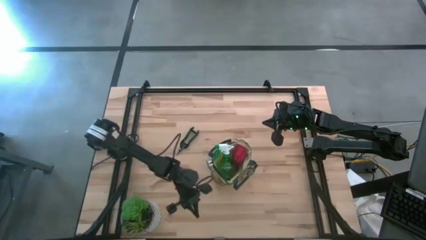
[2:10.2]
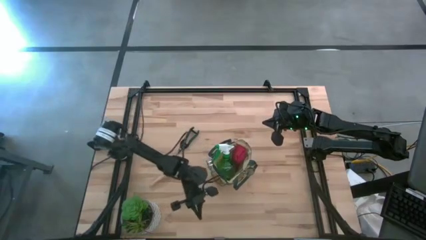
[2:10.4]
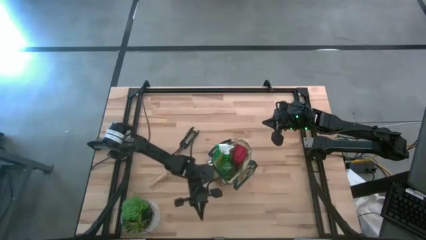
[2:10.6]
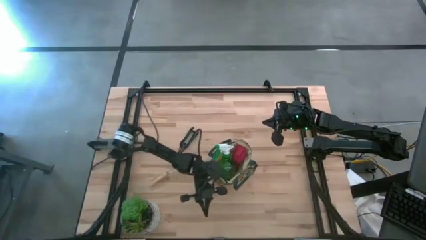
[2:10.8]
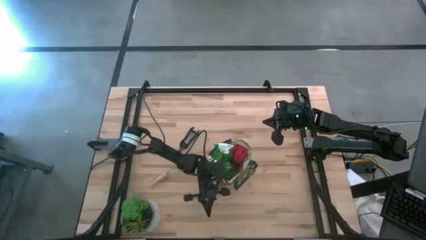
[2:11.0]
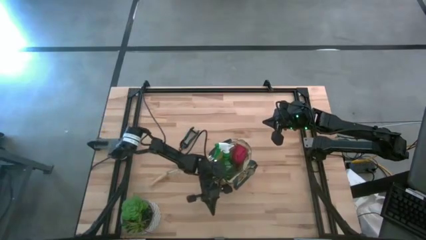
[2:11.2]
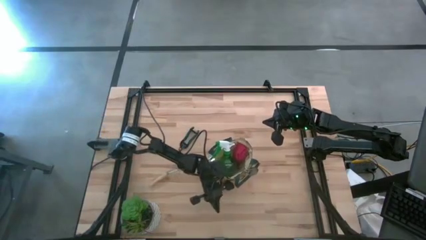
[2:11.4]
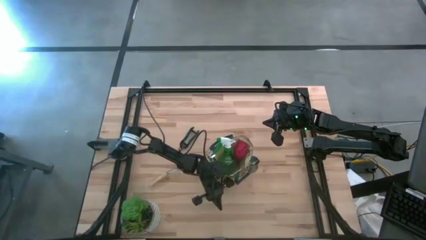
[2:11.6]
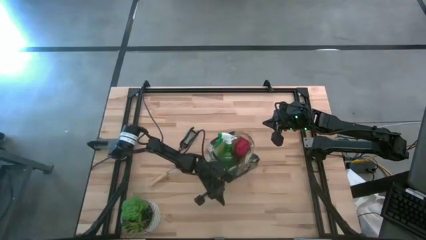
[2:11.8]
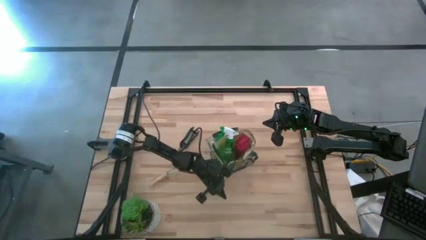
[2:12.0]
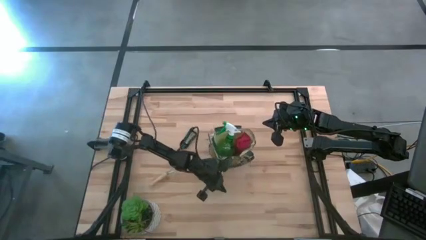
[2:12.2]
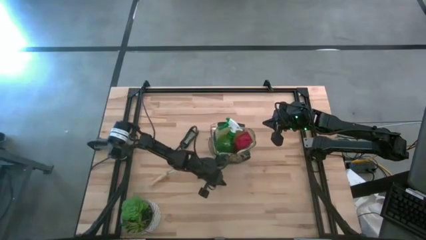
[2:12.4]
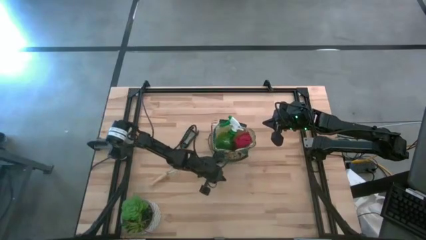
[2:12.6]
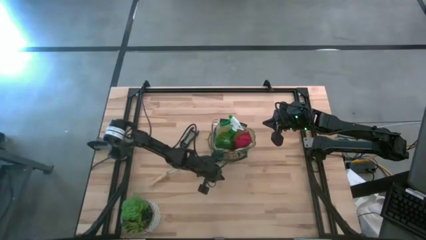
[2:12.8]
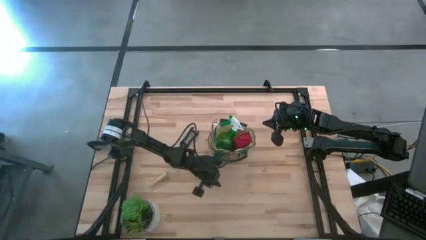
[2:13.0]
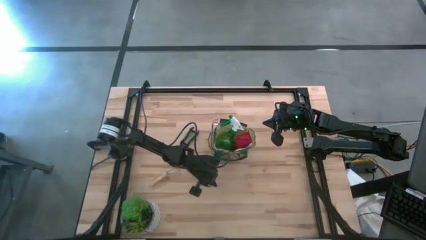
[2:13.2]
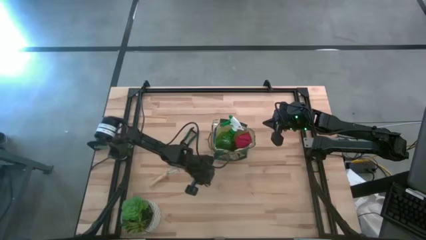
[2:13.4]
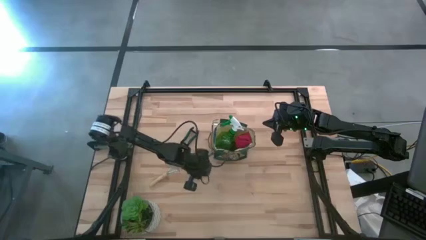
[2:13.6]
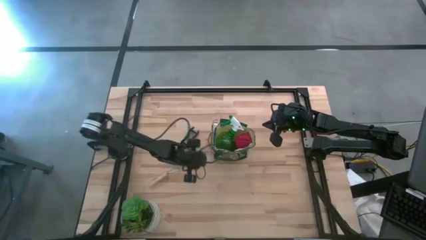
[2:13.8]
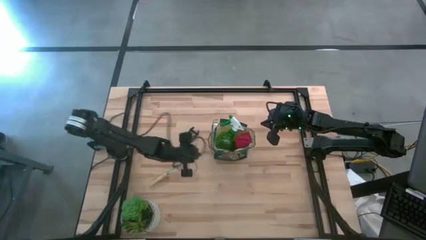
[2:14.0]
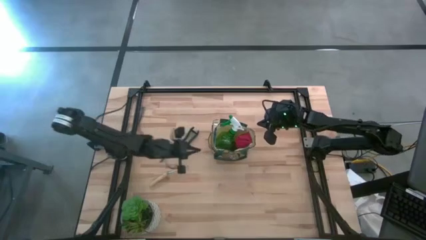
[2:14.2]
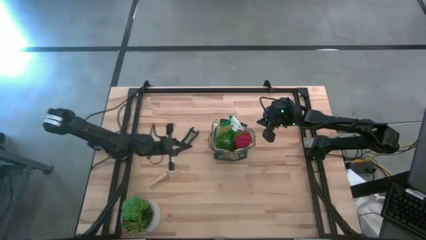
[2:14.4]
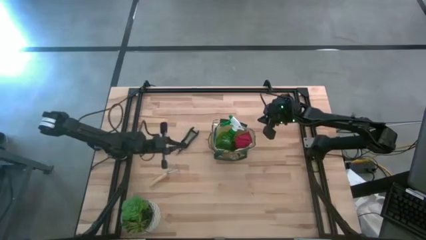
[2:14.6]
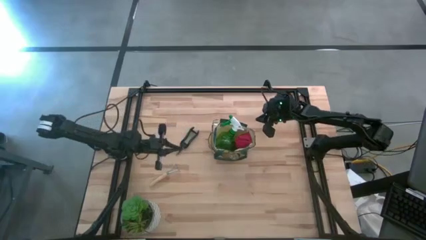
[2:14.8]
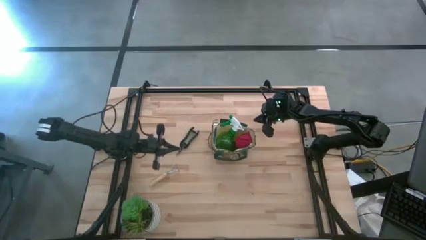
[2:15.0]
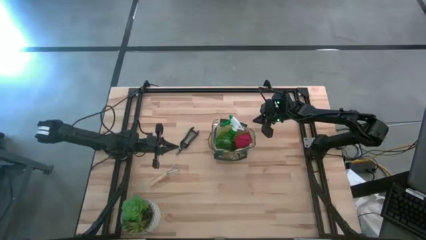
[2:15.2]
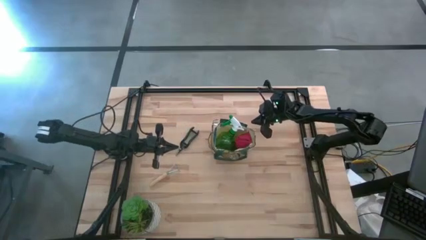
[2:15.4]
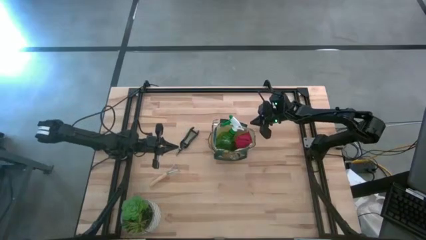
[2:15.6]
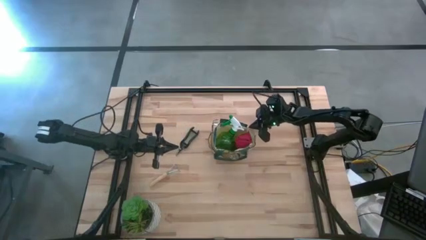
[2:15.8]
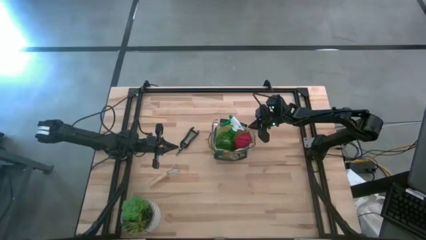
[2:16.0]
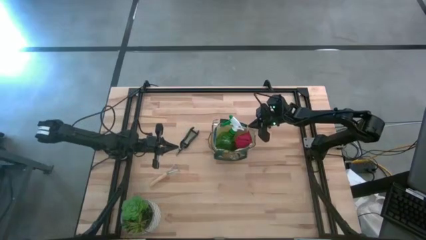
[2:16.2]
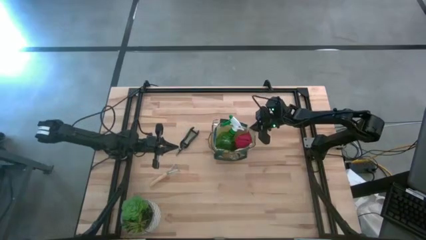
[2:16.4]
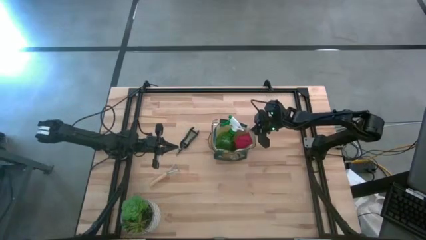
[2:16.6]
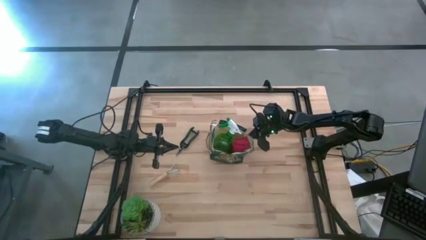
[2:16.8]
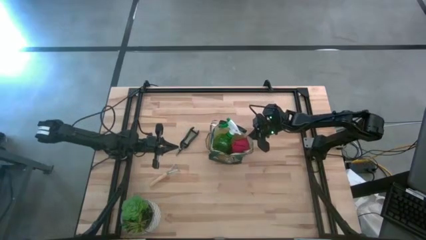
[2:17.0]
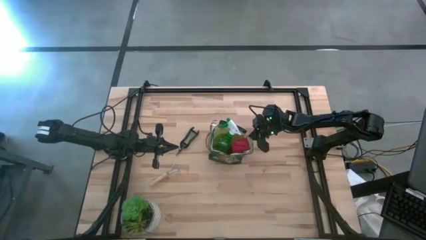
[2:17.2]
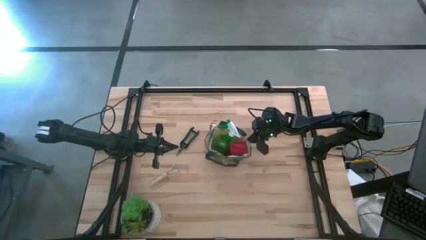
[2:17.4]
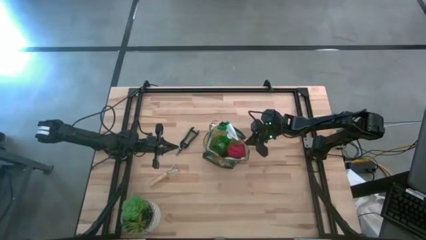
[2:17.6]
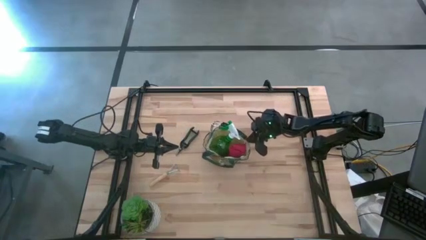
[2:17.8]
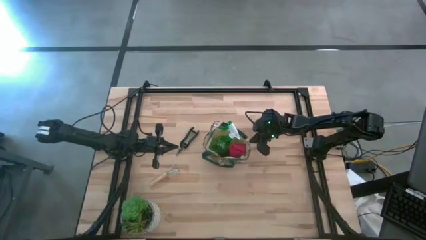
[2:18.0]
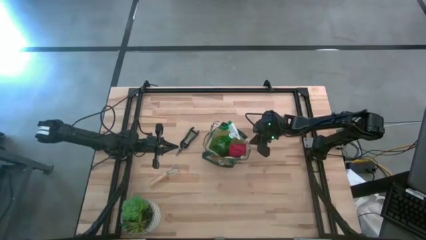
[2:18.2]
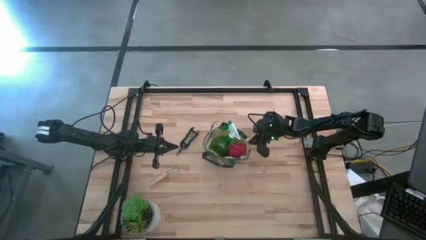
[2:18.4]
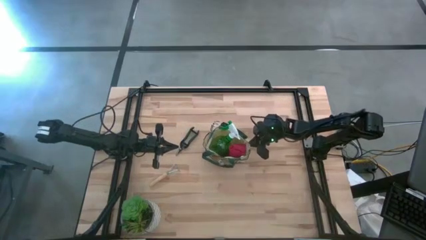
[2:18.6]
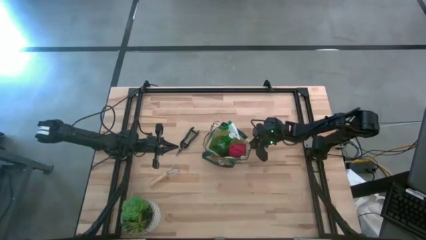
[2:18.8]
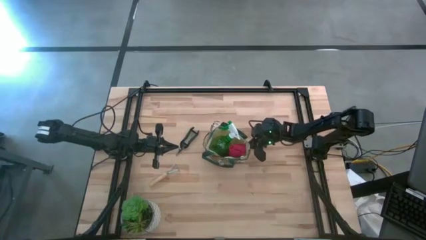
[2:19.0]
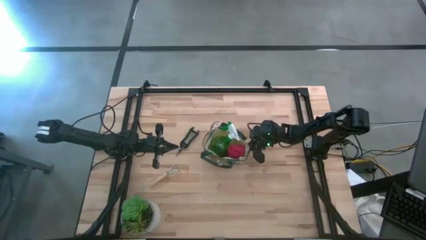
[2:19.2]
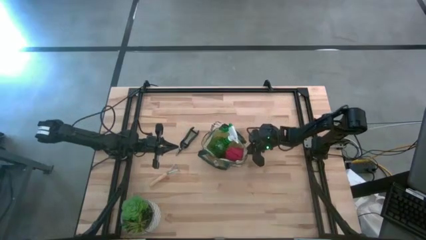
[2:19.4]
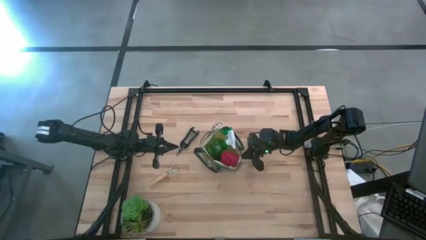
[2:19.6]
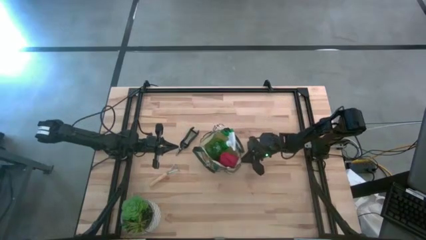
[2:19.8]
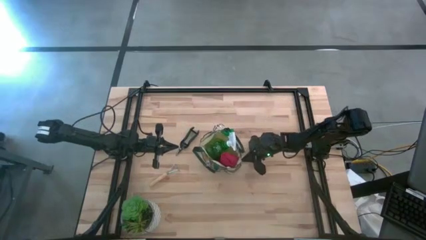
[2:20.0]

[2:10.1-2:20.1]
Task: Pick & Place Garden tools in Gardening bag
Adjust the gardening bag

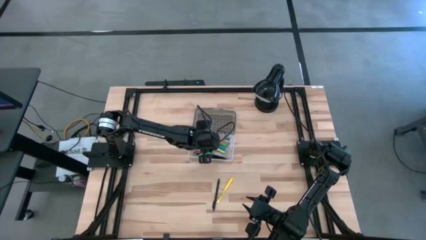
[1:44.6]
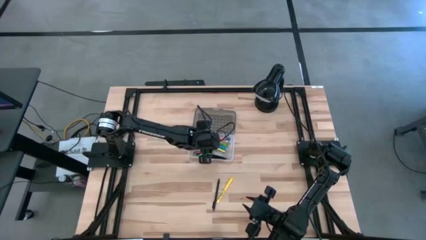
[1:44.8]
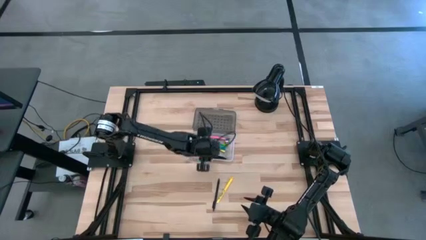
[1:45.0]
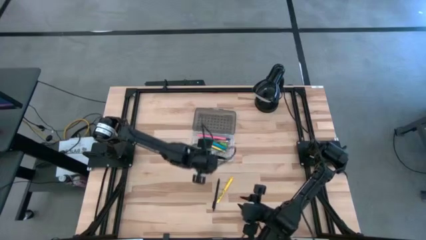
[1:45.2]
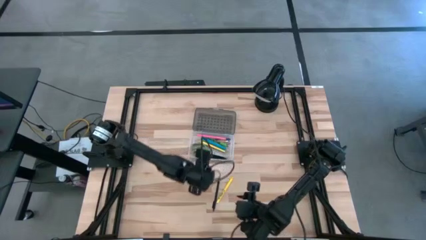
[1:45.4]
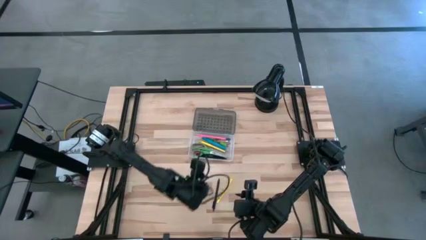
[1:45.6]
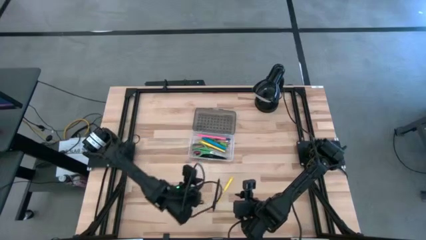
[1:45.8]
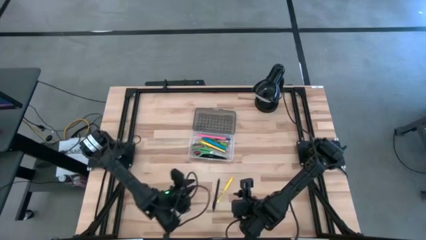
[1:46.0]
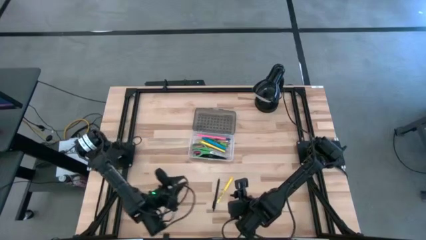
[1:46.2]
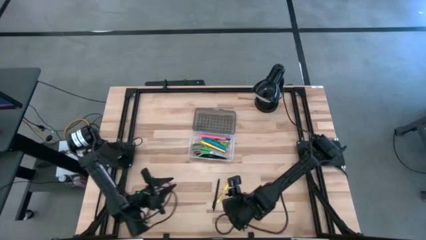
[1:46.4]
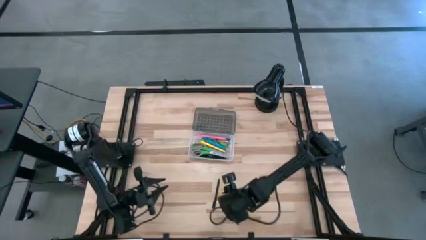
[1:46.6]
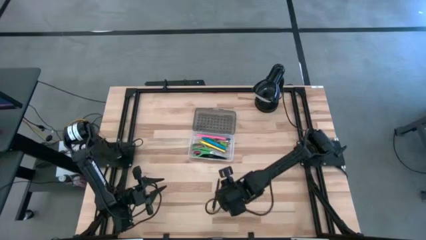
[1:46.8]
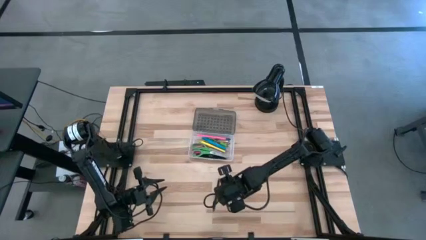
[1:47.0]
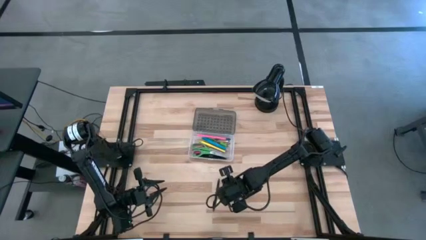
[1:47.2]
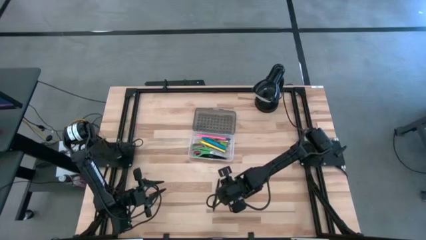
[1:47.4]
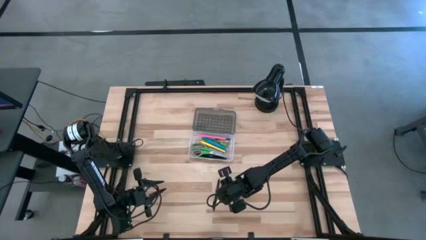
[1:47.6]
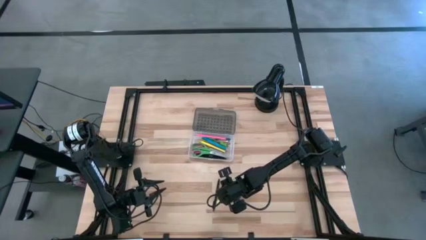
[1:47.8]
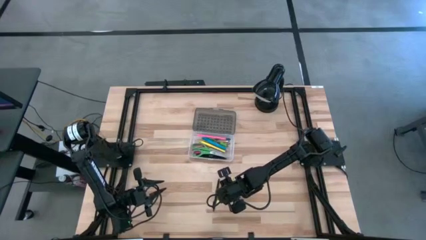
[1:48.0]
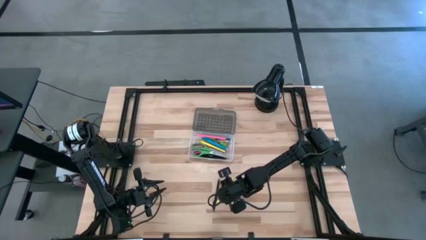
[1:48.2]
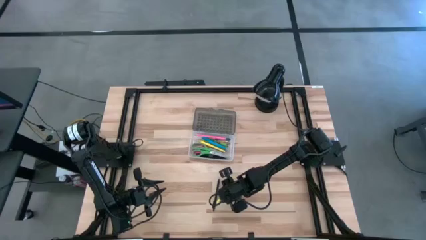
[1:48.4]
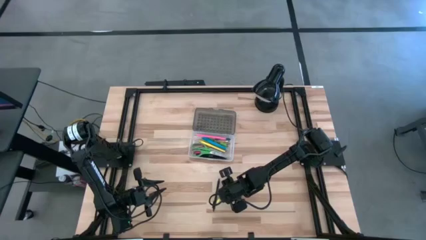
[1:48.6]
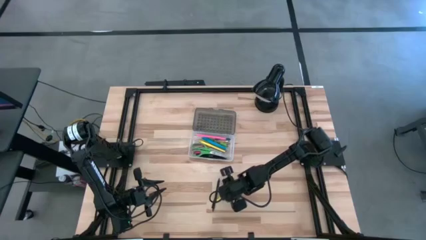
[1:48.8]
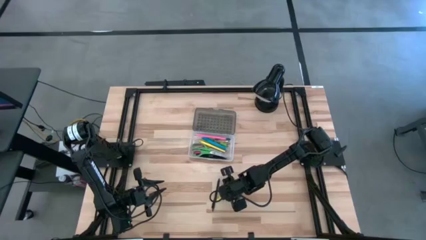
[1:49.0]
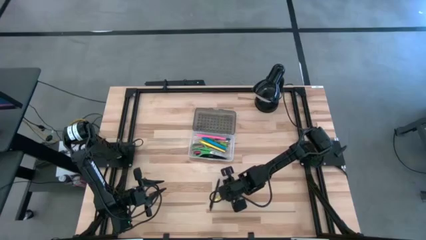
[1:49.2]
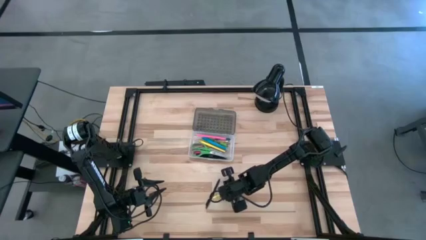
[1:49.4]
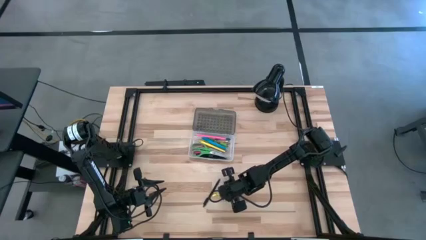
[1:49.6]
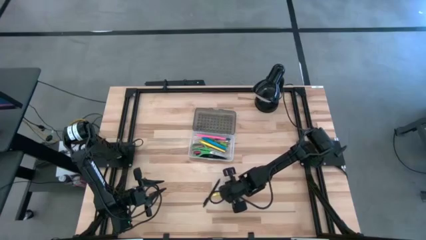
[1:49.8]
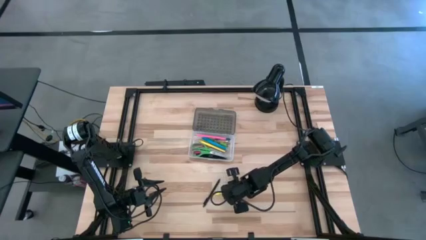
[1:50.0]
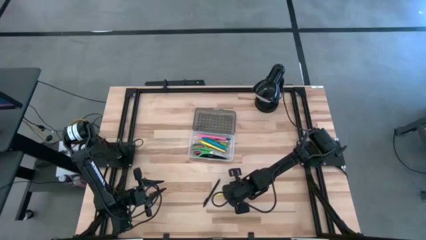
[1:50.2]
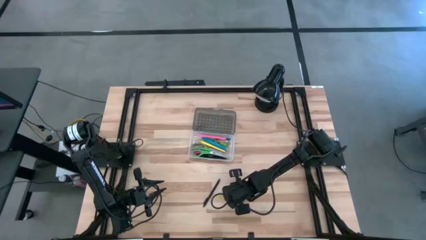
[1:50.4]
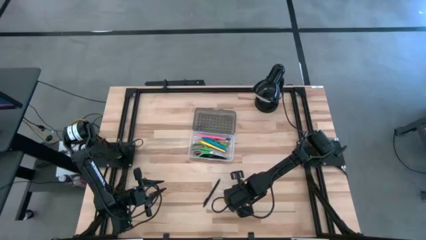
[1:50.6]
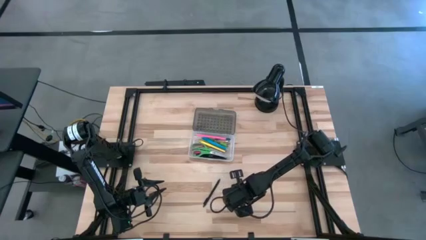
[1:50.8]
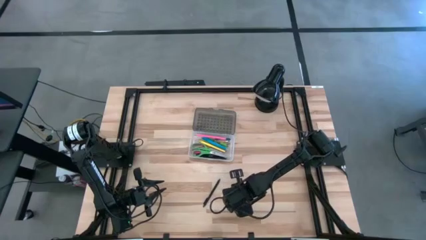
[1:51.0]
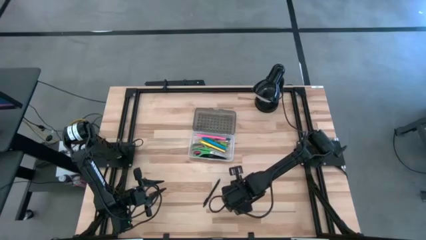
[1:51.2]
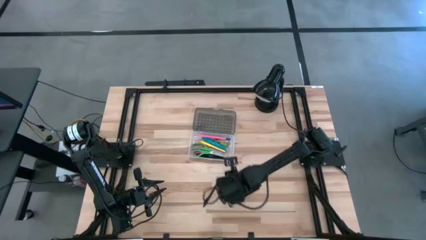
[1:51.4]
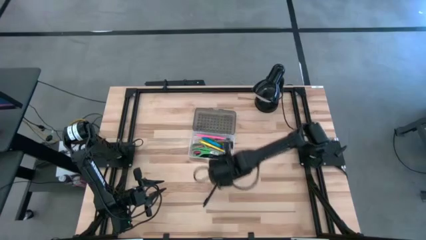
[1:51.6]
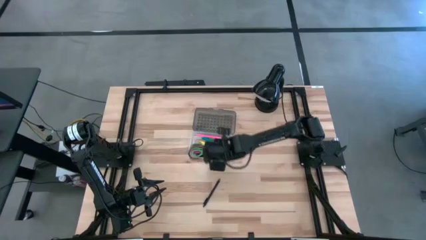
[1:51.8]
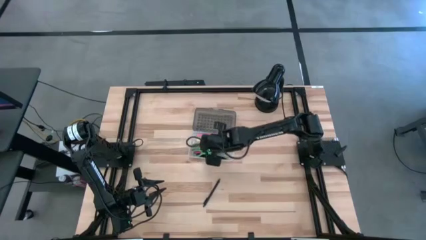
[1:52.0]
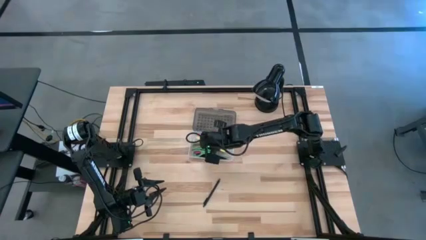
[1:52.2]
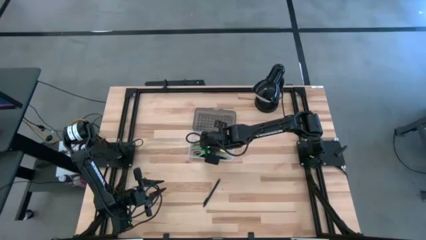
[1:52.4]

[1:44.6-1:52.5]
Task: Pick & place school supplies into a supply box
Put the yellow pen into the transparent supply box
